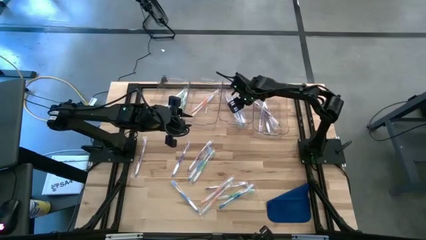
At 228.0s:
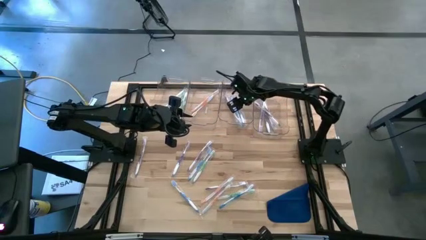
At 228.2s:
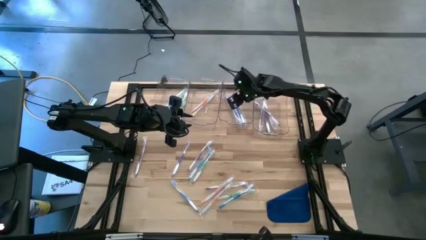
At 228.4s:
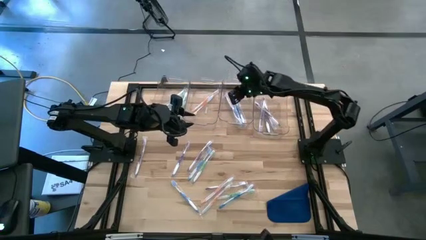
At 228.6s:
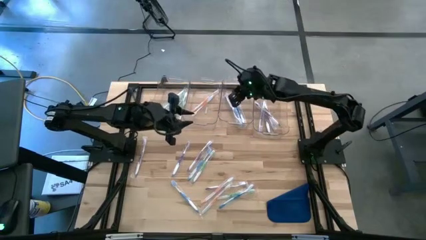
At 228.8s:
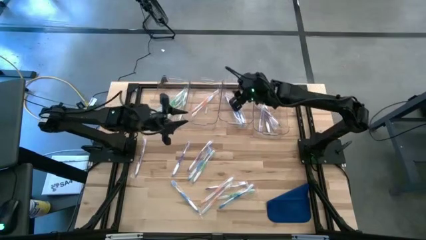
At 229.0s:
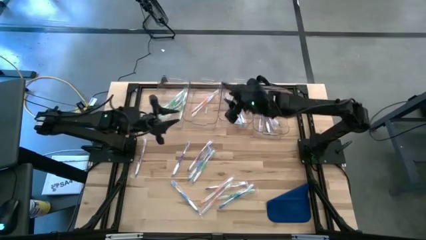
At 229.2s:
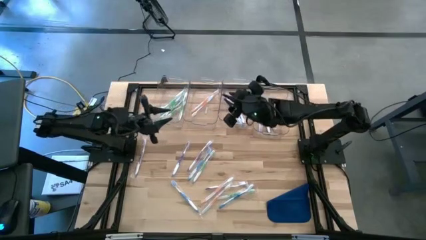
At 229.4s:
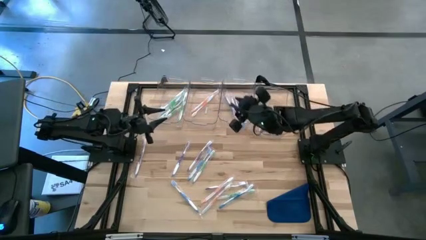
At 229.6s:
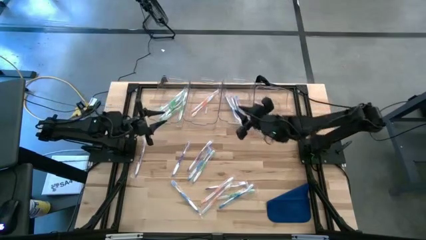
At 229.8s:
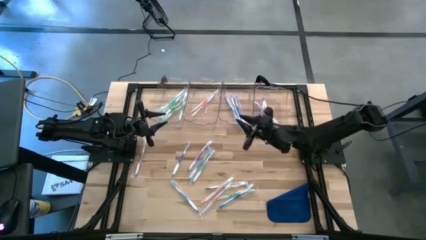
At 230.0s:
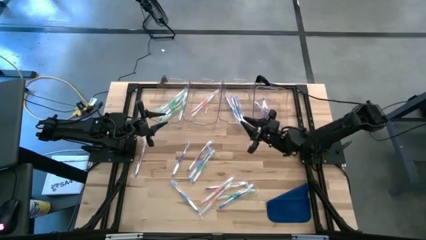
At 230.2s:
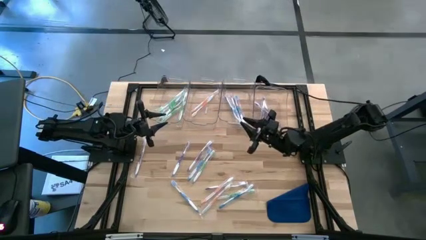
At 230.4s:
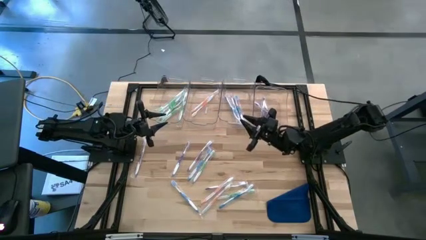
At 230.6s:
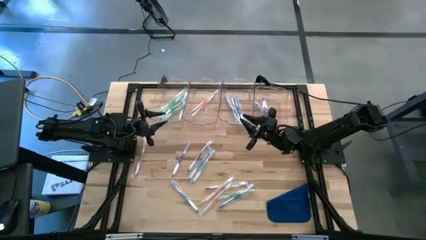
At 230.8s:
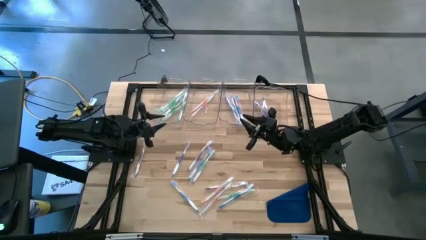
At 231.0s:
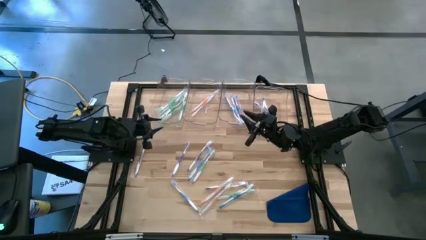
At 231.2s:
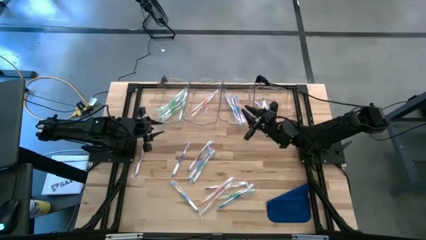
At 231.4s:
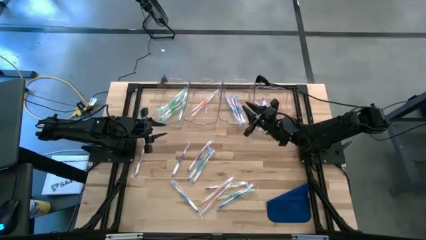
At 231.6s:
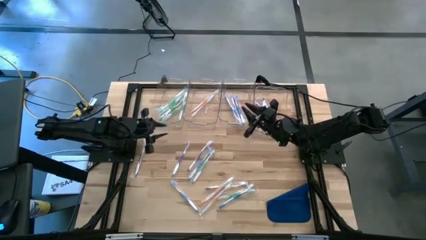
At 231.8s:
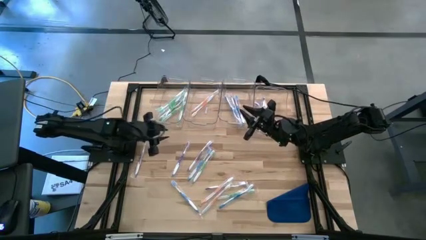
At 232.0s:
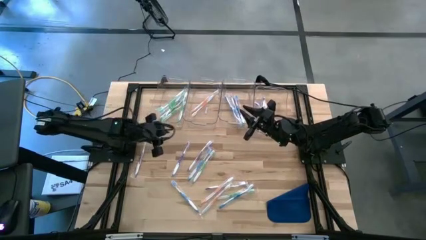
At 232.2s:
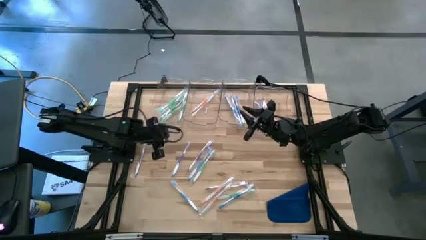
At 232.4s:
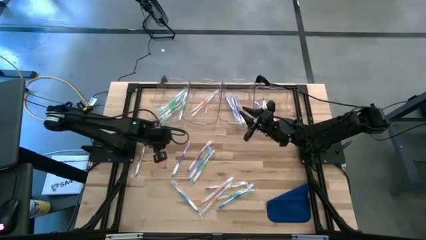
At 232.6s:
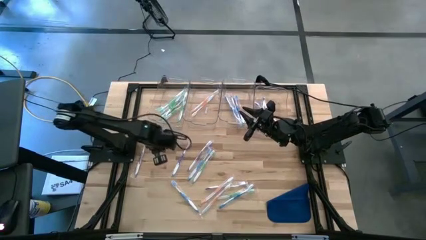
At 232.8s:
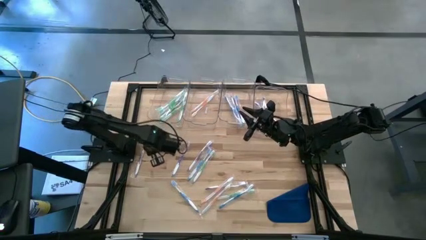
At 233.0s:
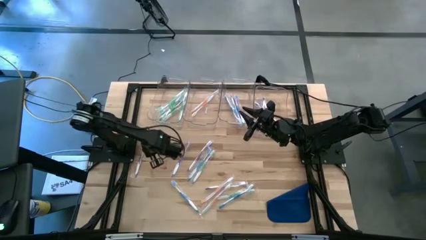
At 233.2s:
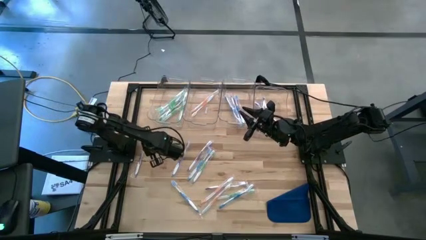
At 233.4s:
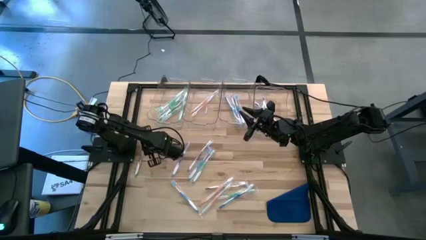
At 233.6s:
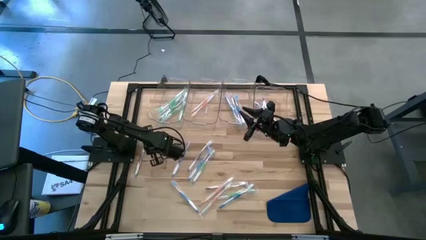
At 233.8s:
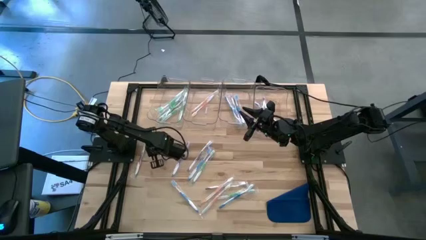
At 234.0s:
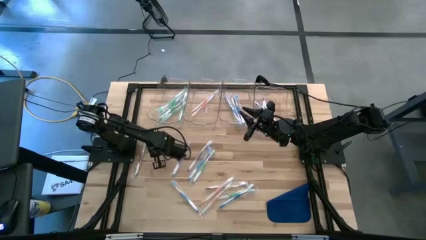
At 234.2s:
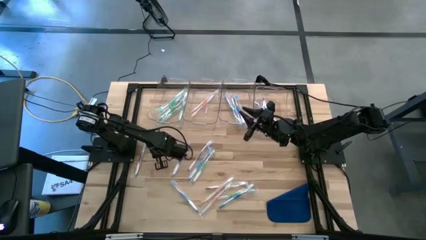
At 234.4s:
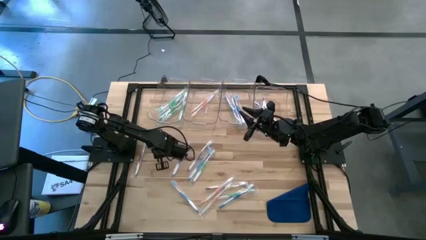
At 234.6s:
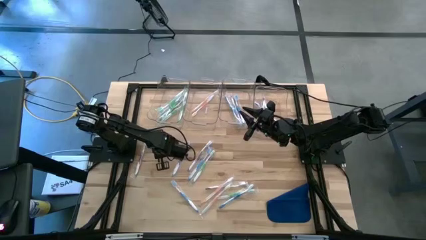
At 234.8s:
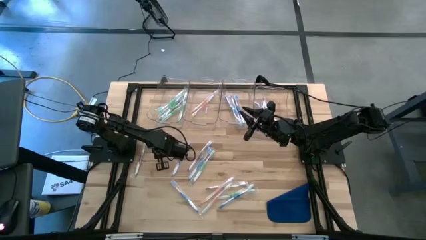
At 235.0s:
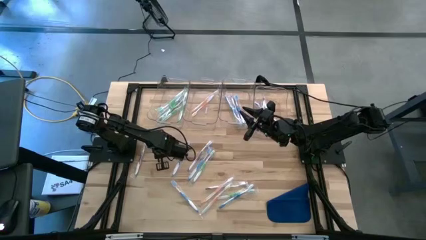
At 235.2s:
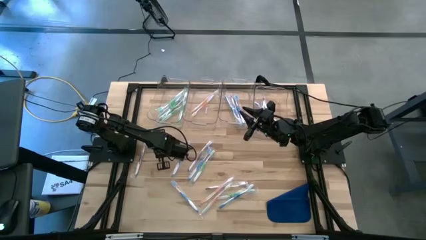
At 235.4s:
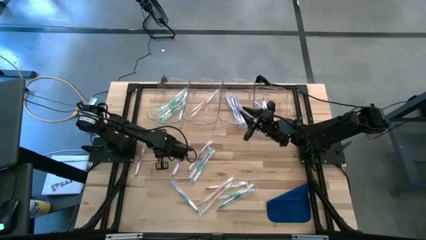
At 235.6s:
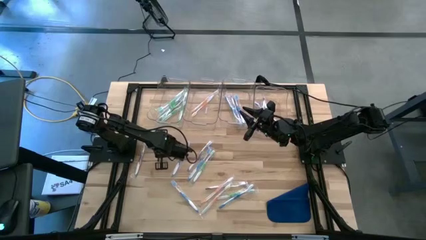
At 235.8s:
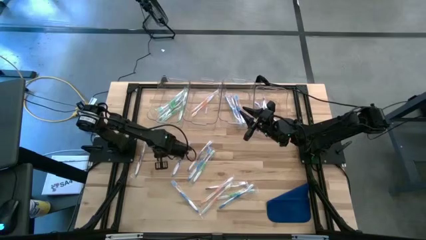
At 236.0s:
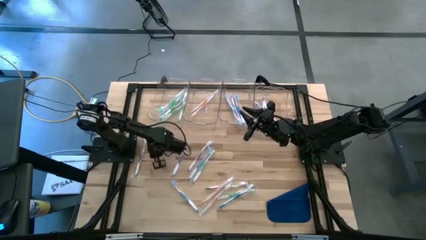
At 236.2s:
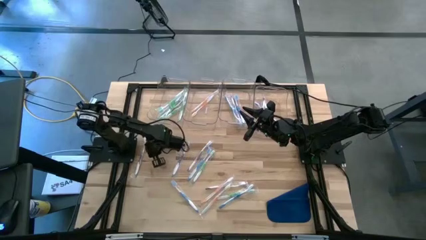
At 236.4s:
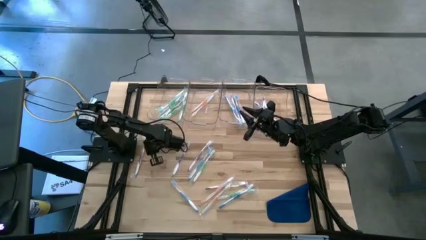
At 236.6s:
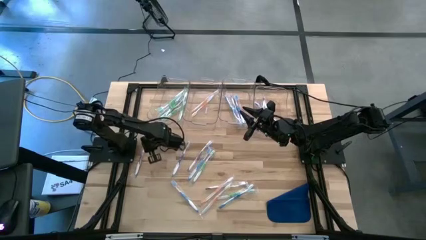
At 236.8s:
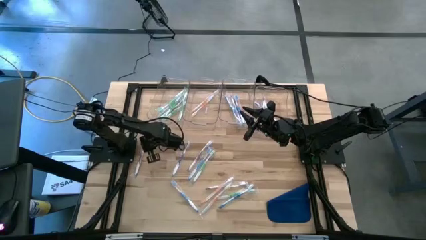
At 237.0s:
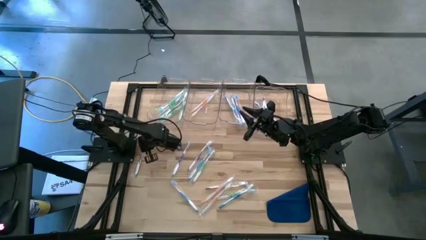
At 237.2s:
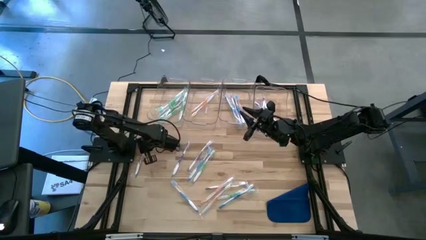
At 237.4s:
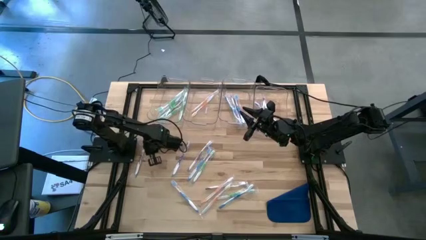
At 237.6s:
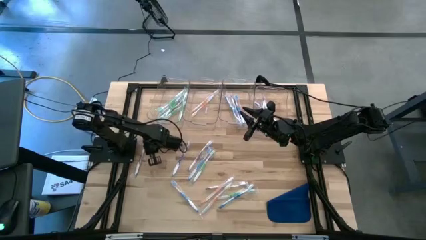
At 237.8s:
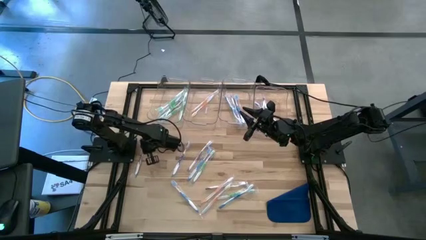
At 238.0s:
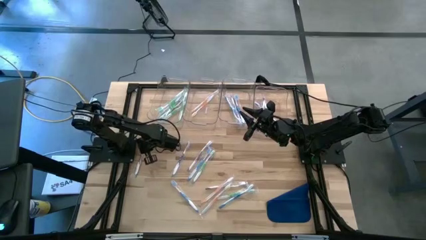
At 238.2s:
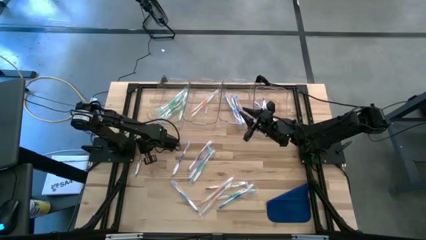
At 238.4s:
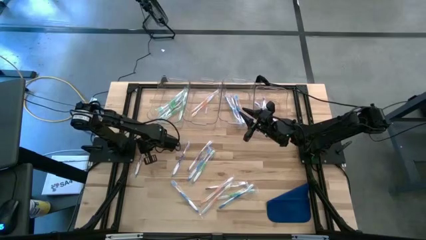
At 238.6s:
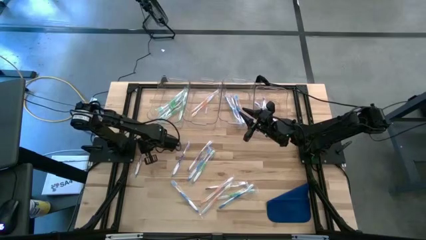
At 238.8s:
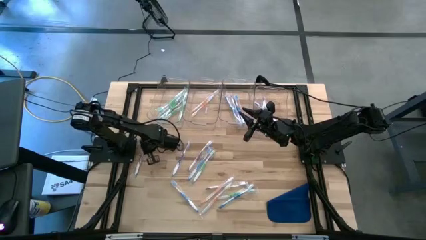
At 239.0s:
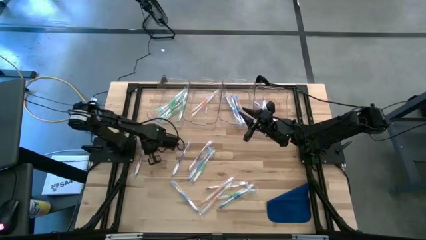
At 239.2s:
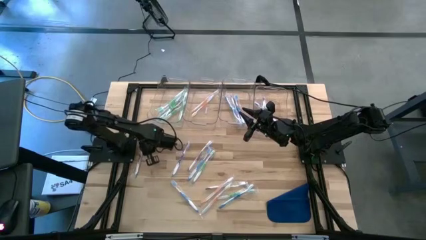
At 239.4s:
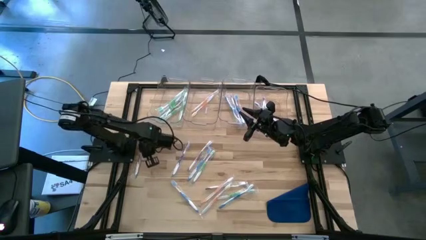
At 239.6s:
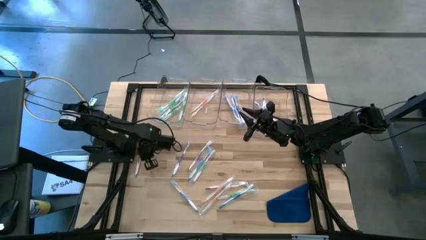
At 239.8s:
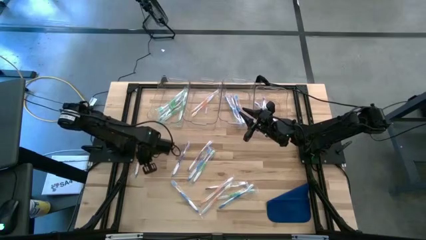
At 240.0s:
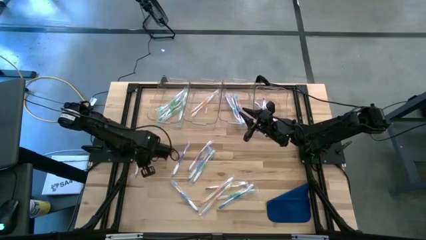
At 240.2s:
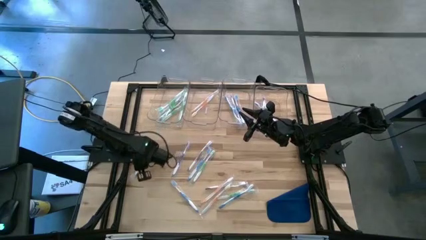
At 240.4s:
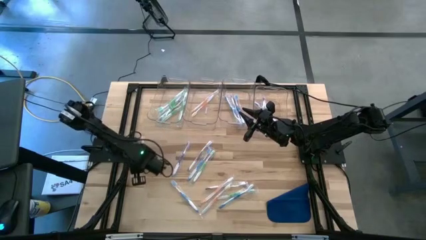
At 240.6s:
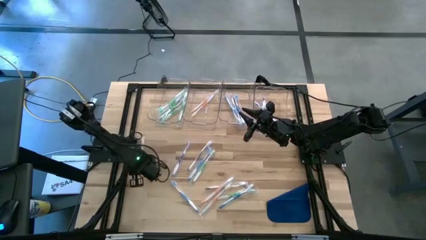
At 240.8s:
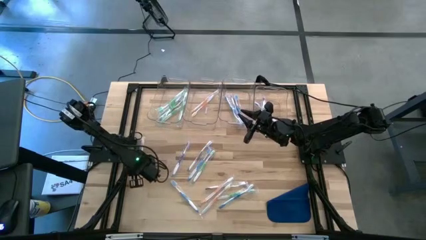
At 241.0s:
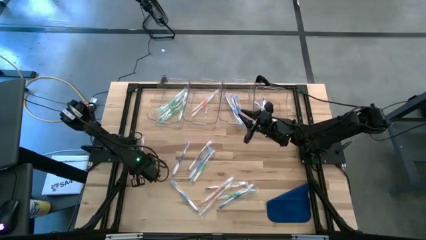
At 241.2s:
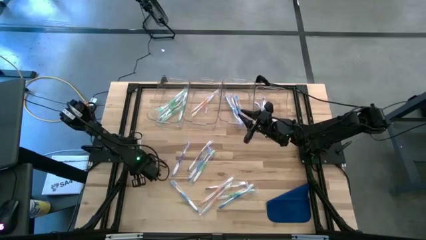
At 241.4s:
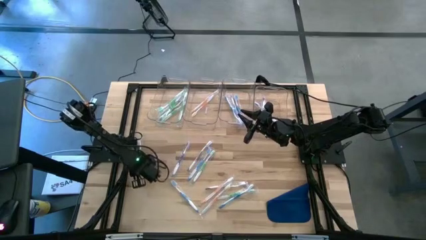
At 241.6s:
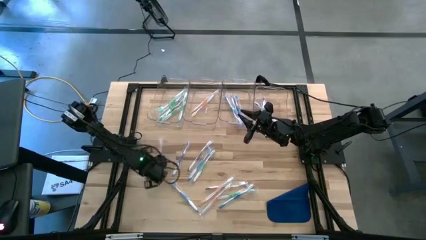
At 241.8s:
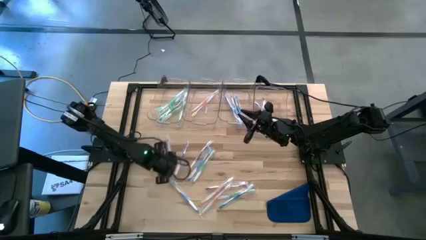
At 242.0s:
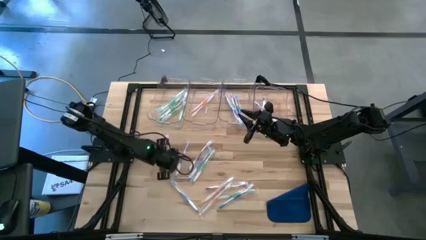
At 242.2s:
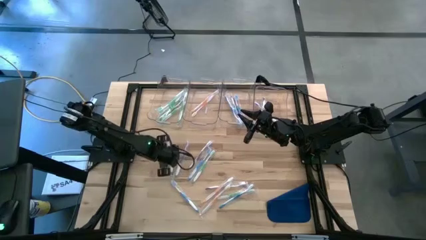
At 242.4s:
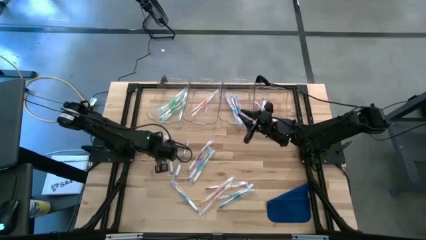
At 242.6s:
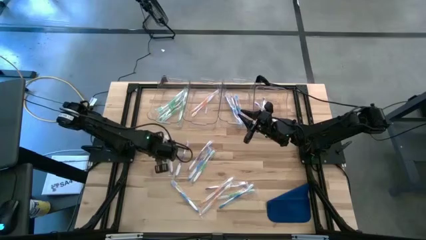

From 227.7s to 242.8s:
Task: Pick & Place Toothbrushes
Put the violet toothbrush into the right transparent bin

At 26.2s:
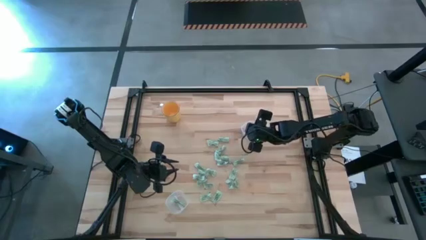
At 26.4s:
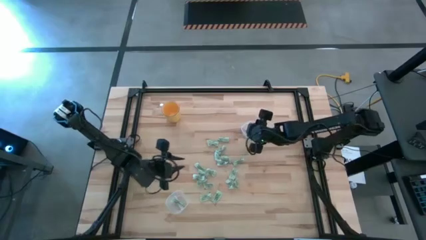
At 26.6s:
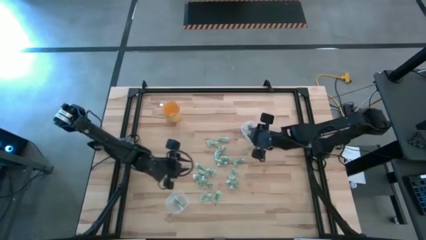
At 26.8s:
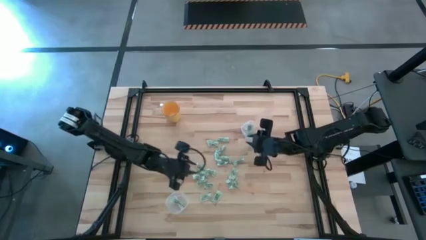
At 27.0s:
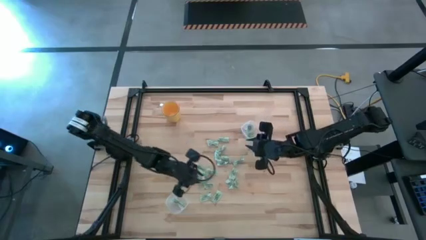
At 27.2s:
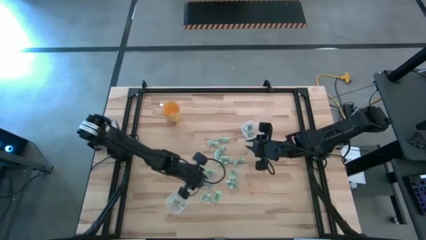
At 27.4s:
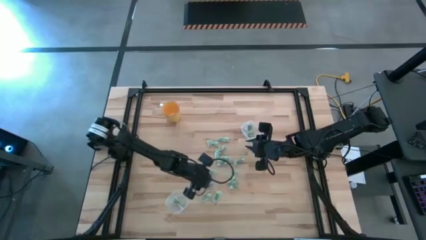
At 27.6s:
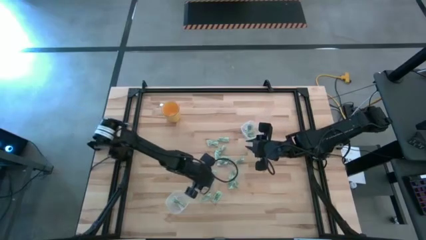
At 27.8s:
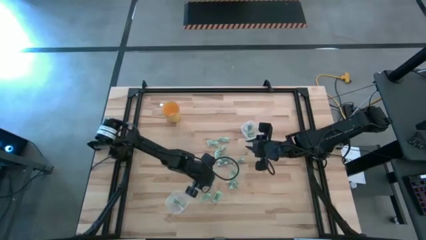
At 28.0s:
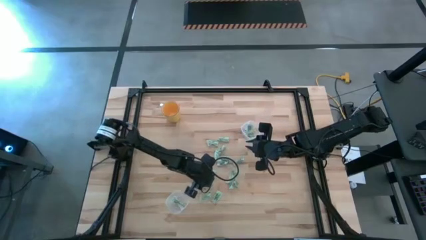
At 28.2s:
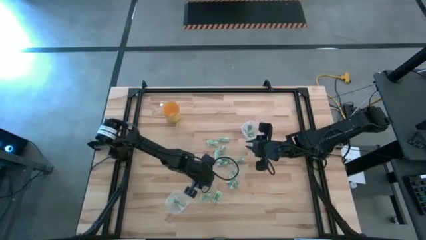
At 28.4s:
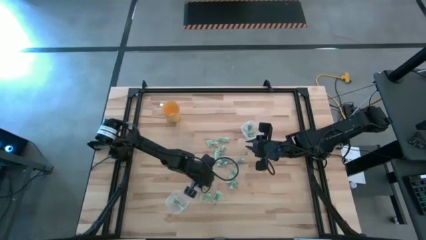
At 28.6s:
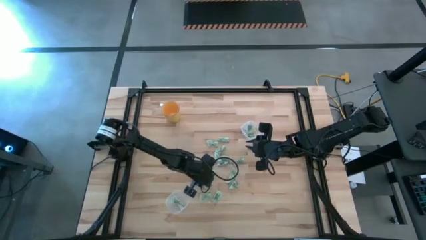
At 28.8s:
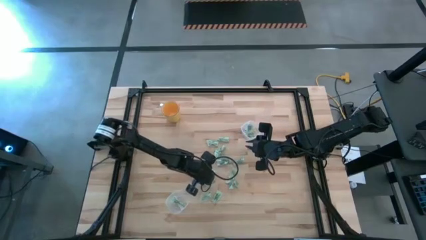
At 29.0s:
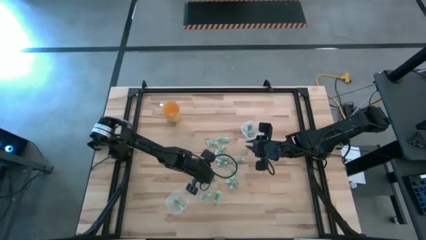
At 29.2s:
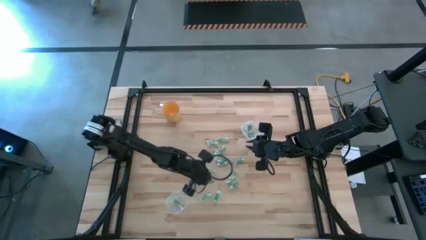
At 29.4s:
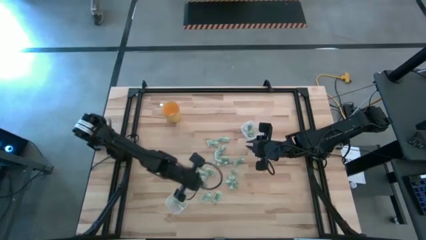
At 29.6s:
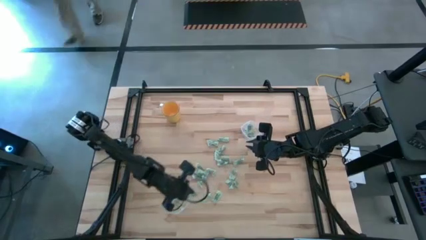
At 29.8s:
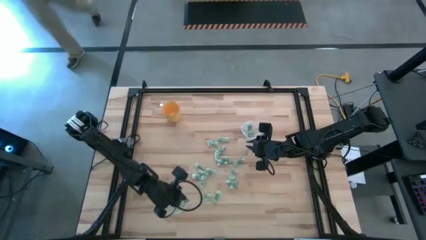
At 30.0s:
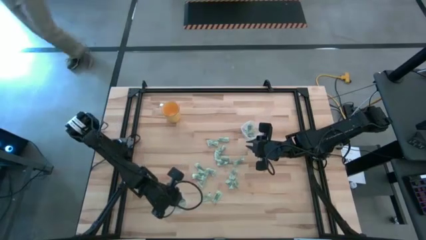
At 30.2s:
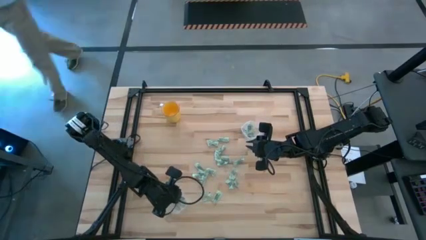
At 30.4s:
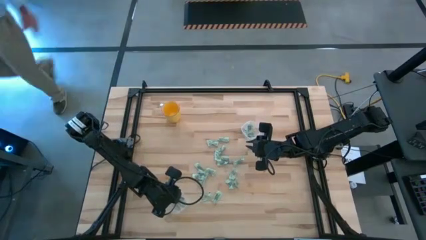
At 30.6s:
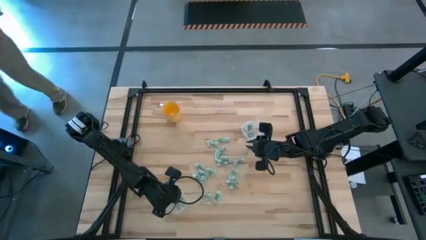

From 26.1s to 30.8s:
Task: Pick and place Stevia / Truvia into bins
Put the green stevia packet into the bottom transparent container
